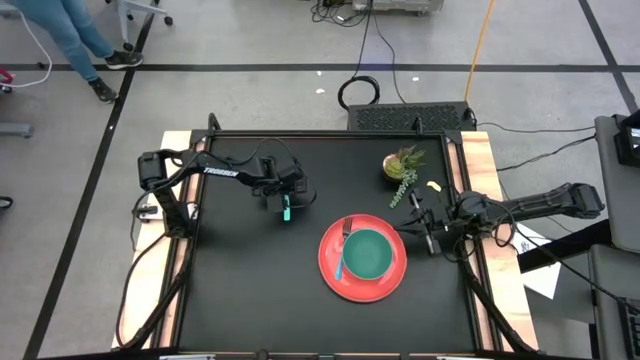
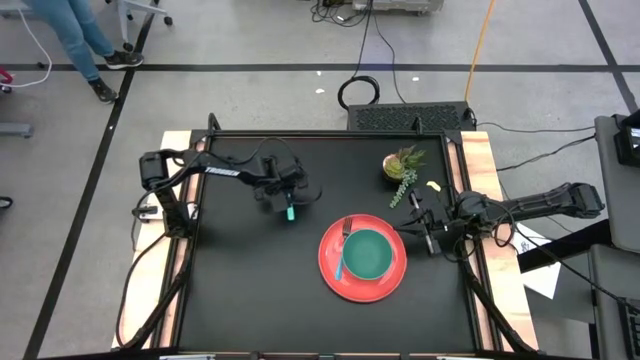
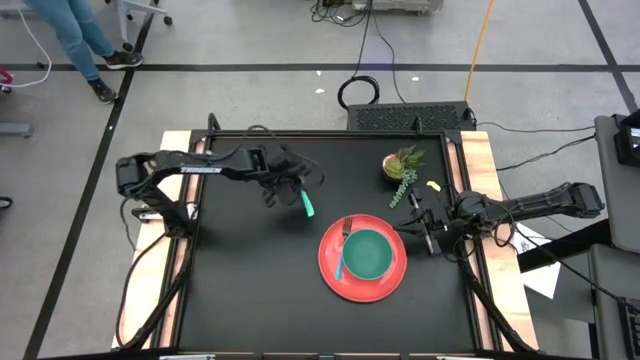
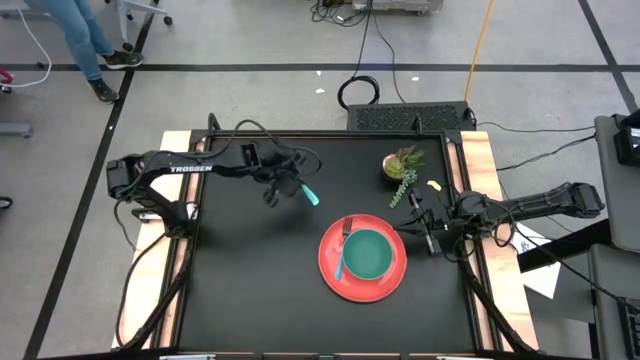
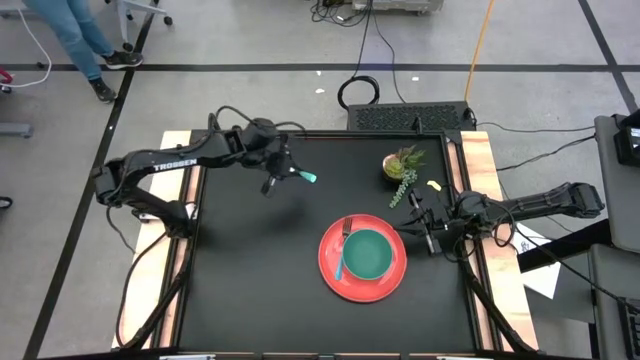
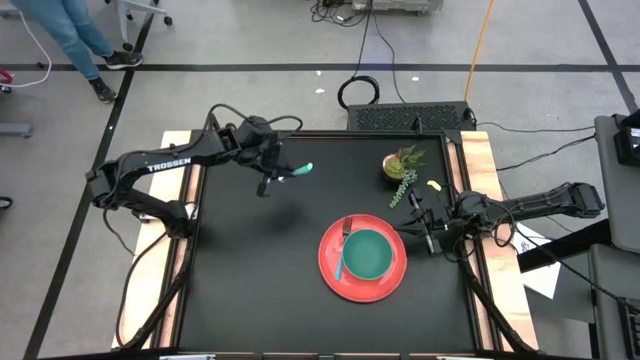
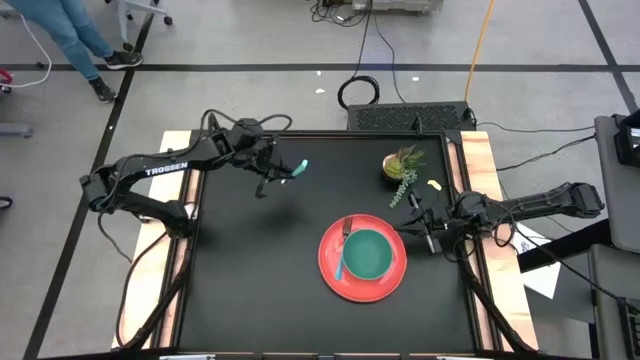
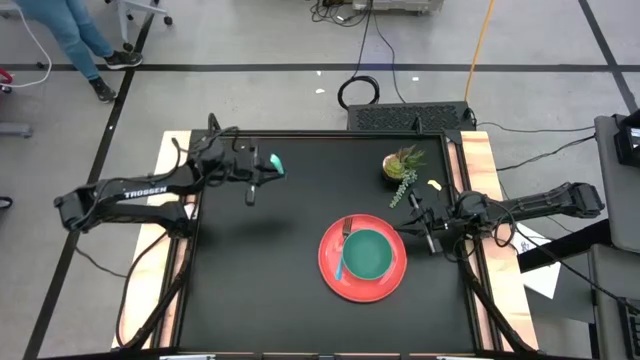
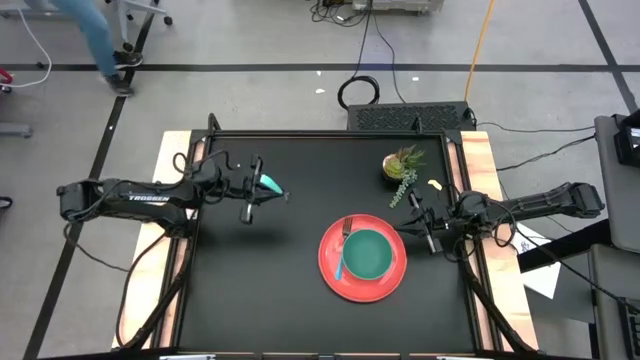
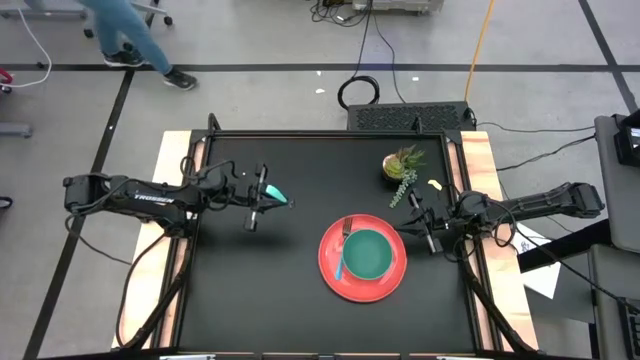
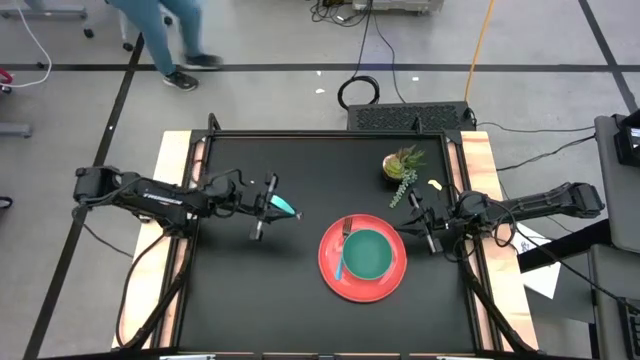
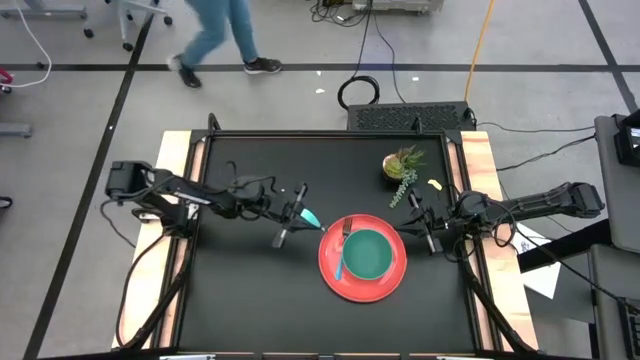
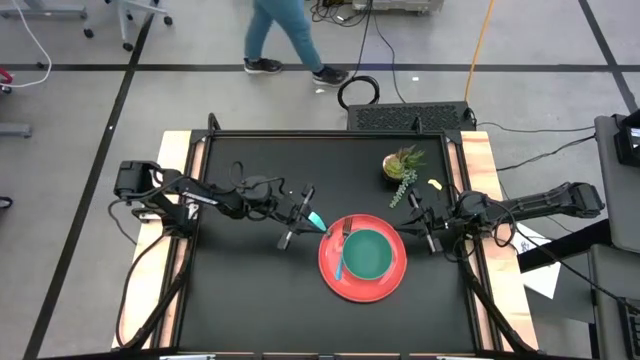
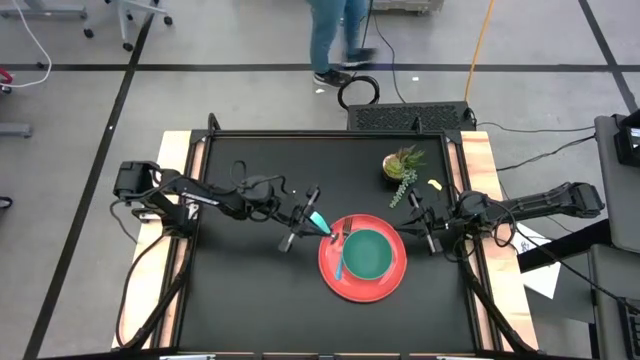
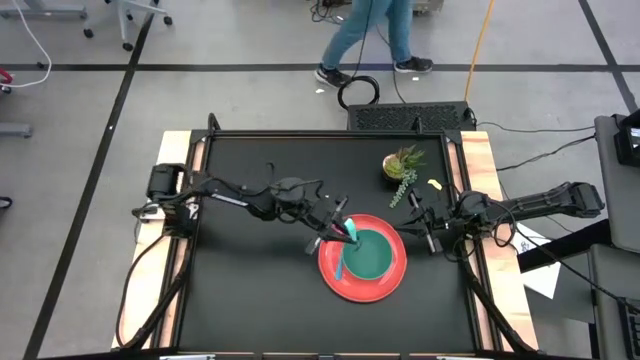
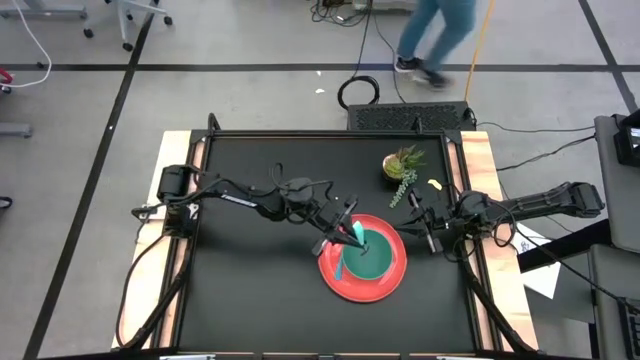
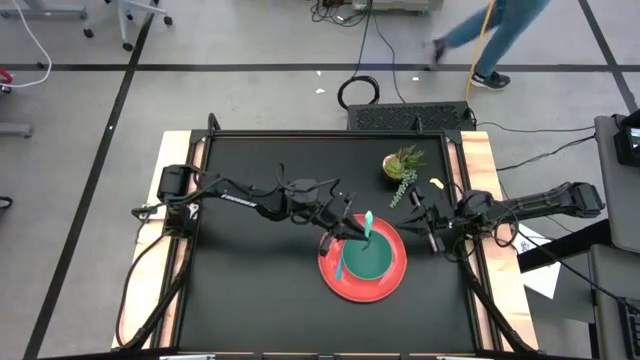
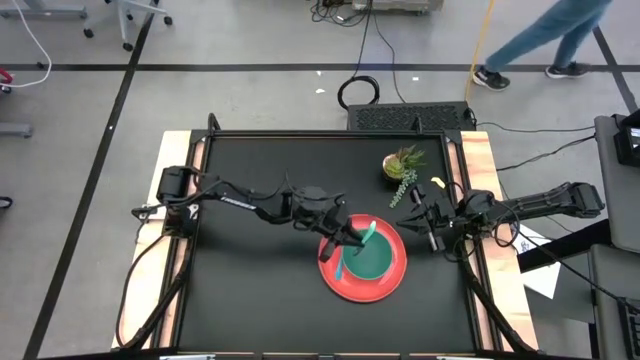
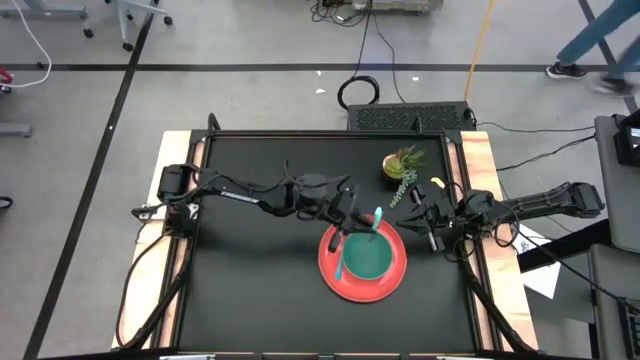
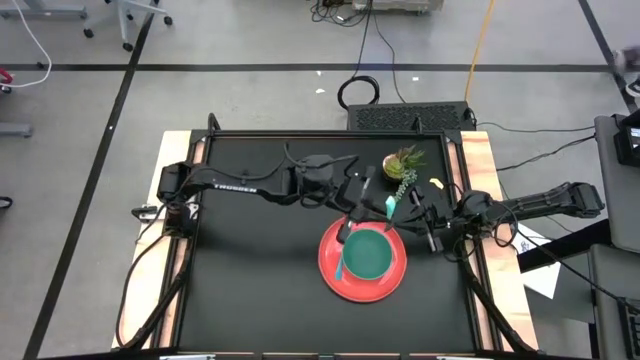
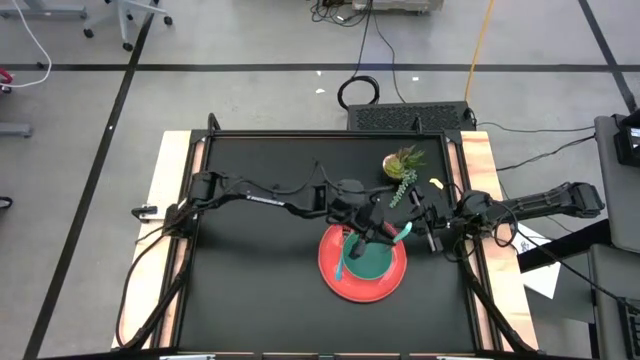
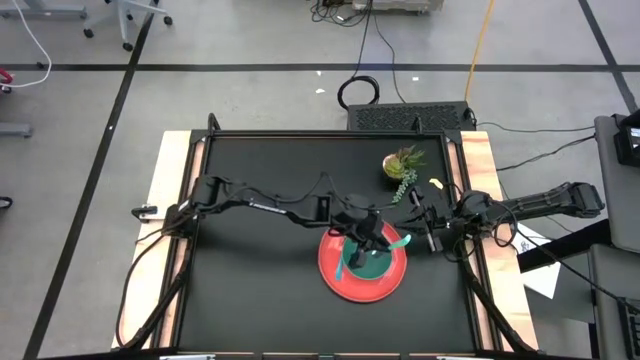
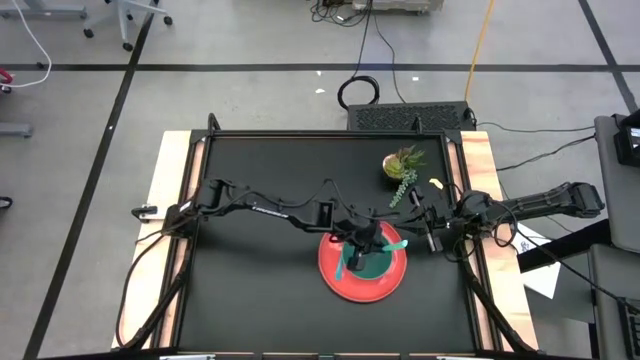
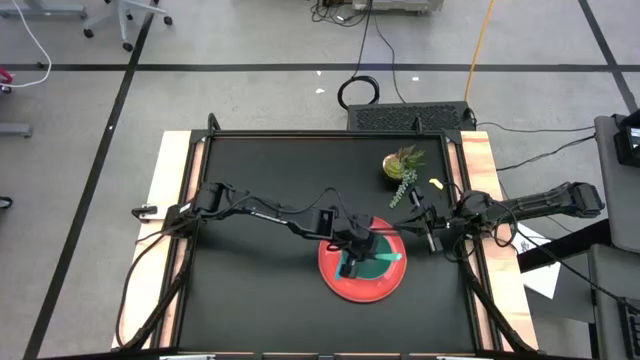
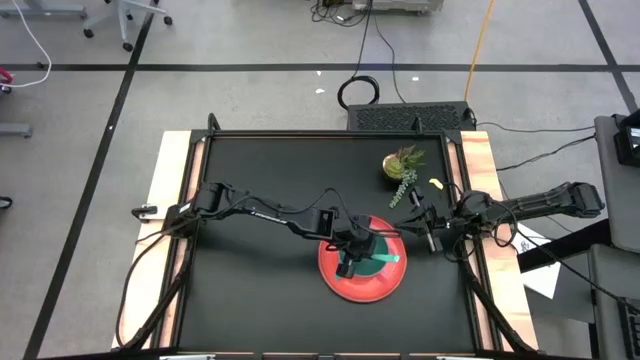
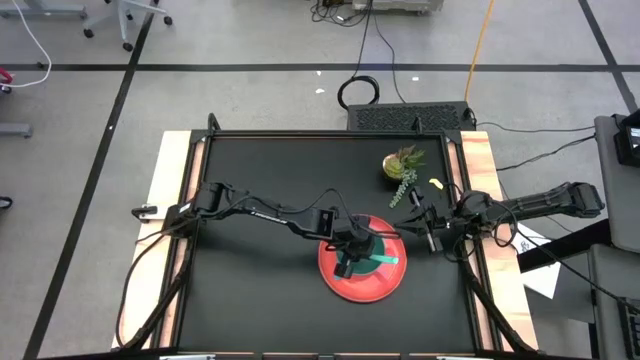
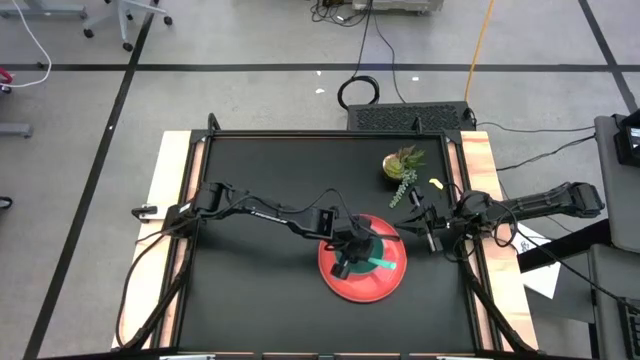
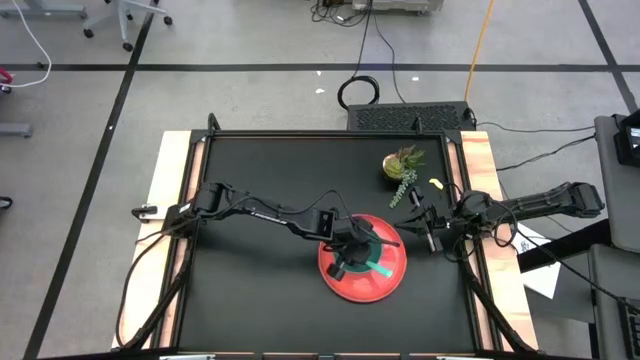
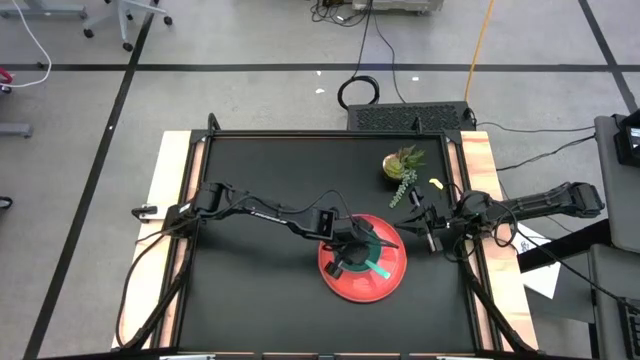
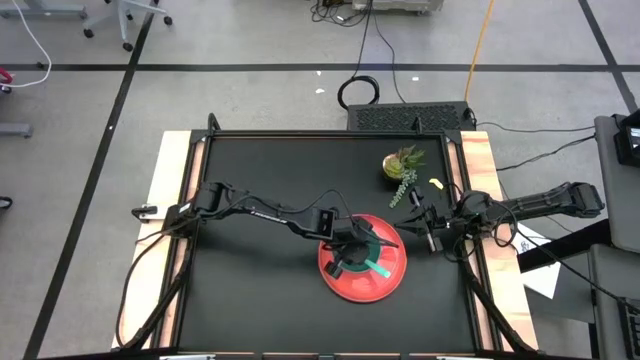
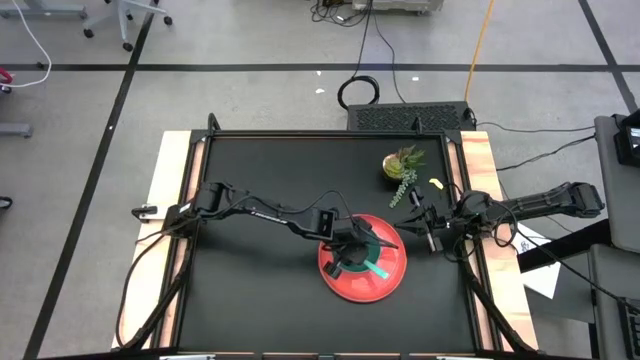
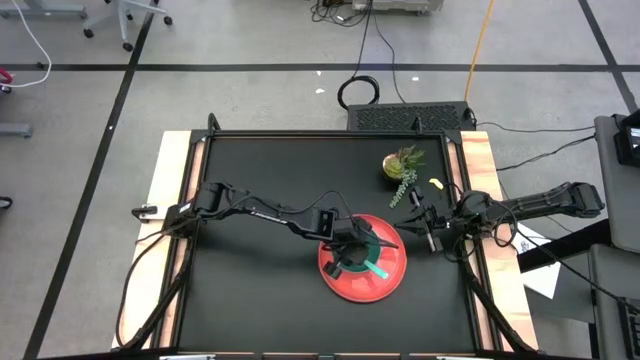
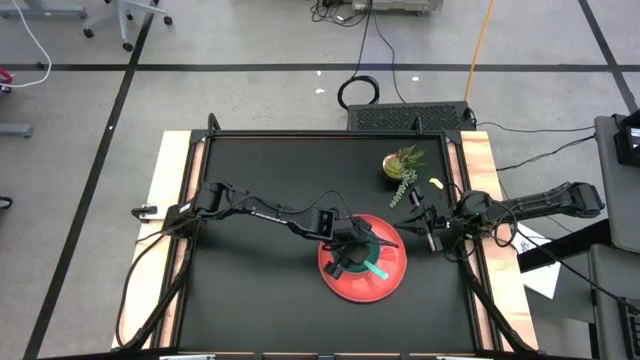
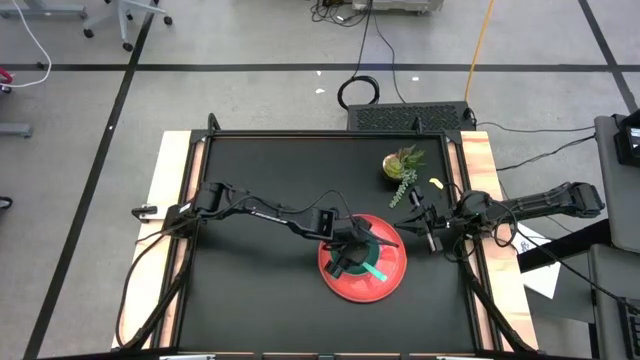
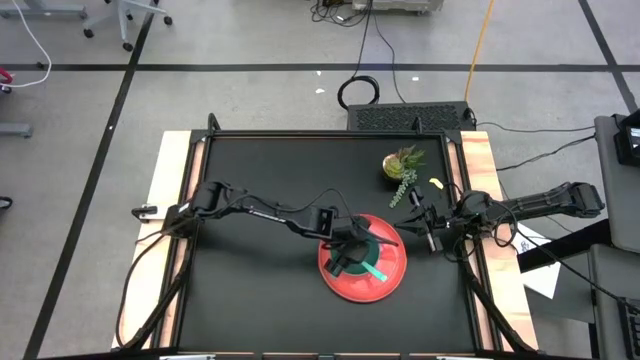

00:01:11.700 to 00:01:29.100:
Task: Set table place
Put the blue spoon into the green bowl
